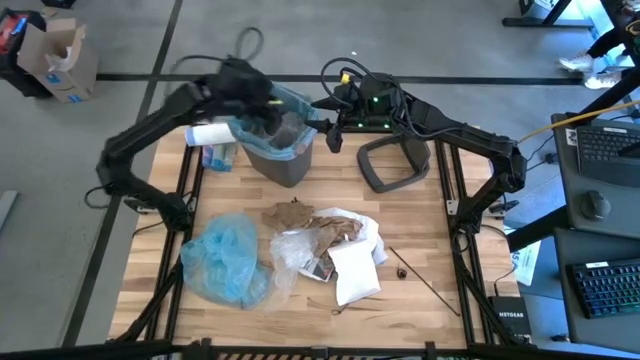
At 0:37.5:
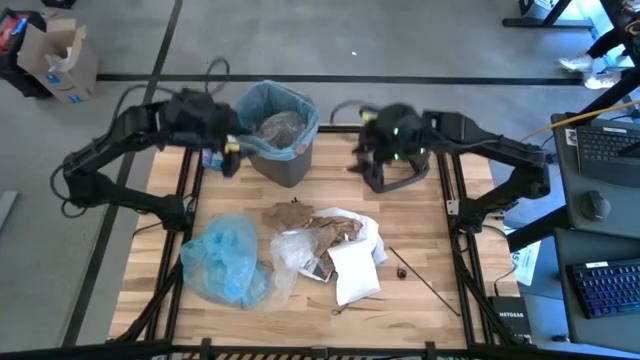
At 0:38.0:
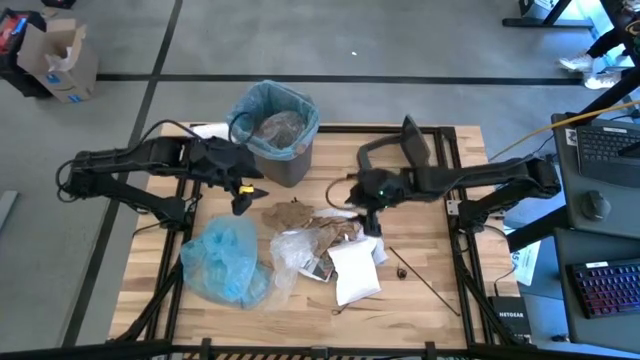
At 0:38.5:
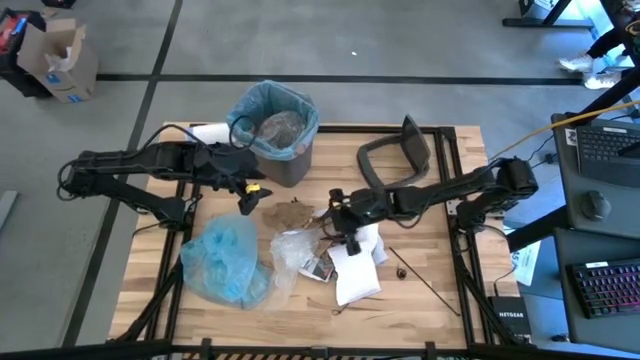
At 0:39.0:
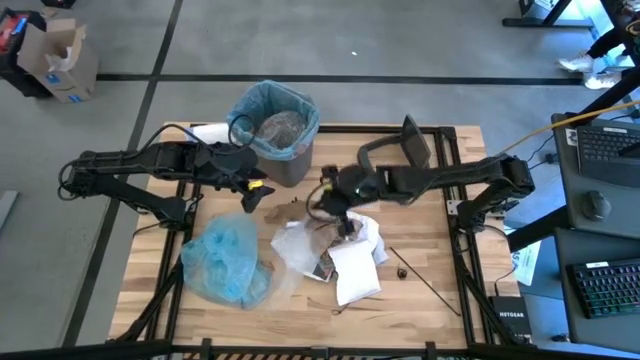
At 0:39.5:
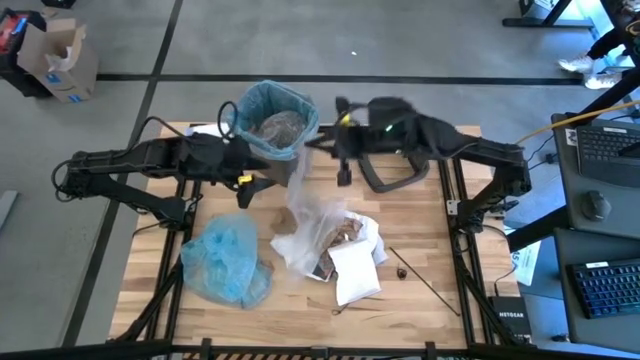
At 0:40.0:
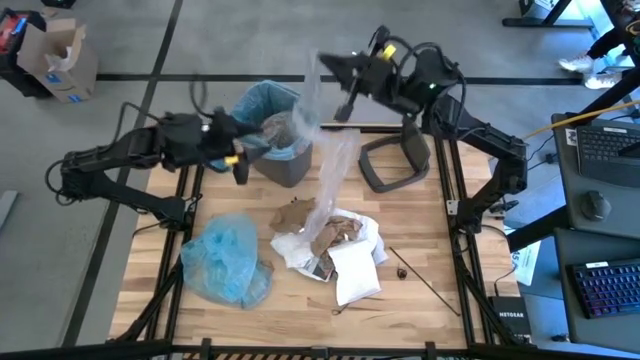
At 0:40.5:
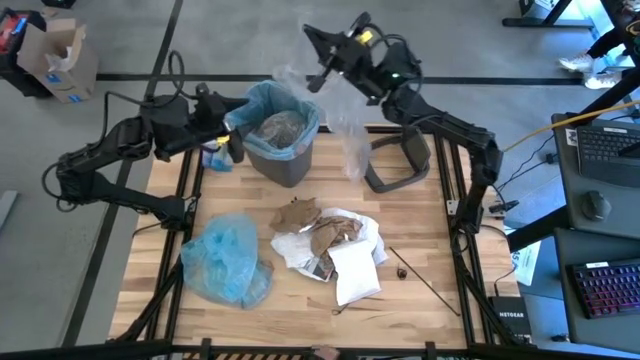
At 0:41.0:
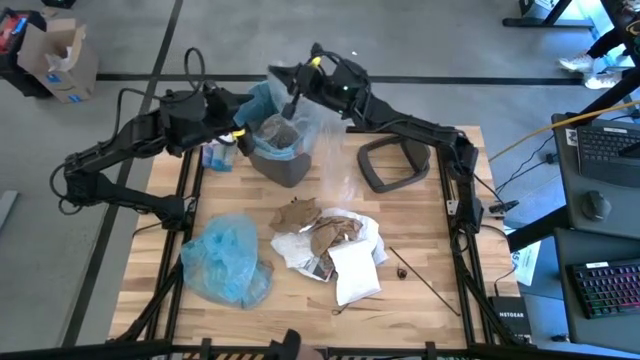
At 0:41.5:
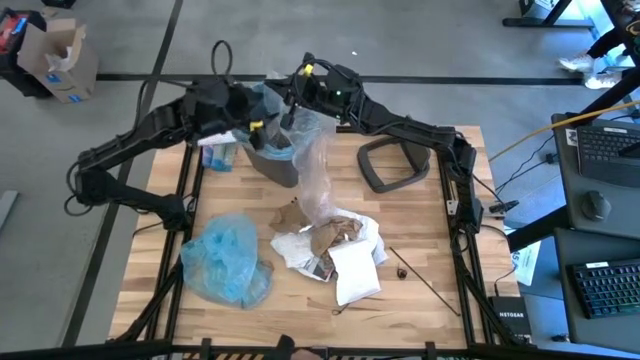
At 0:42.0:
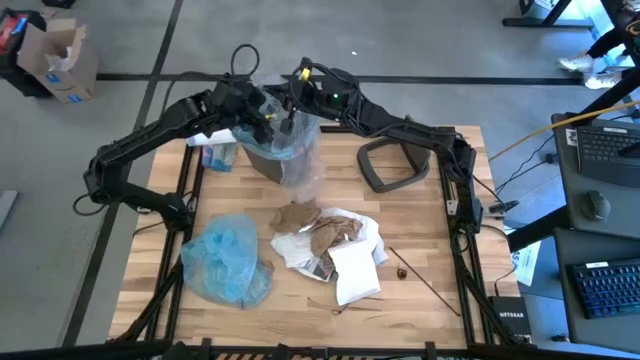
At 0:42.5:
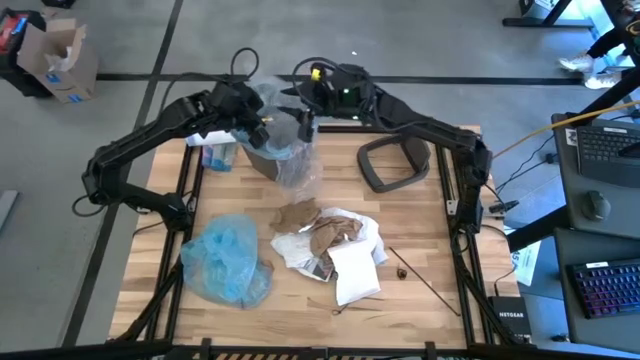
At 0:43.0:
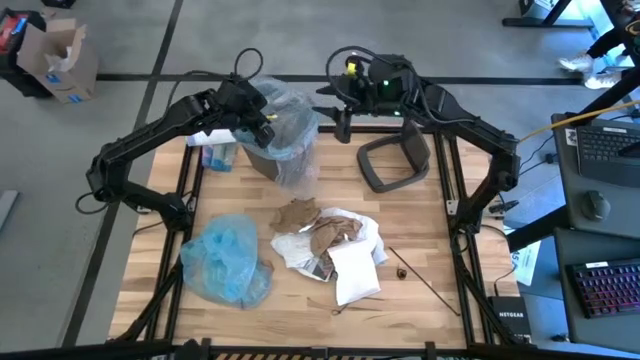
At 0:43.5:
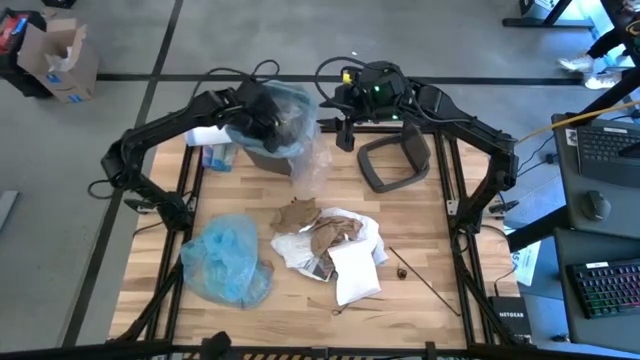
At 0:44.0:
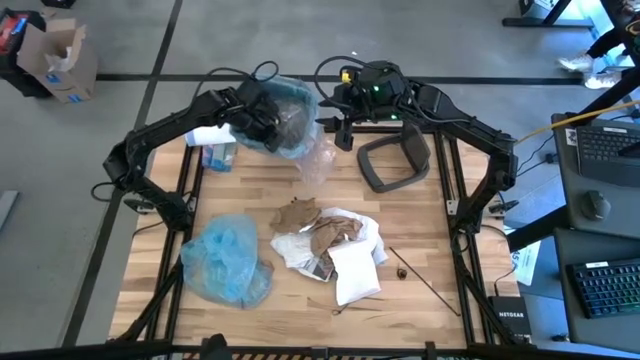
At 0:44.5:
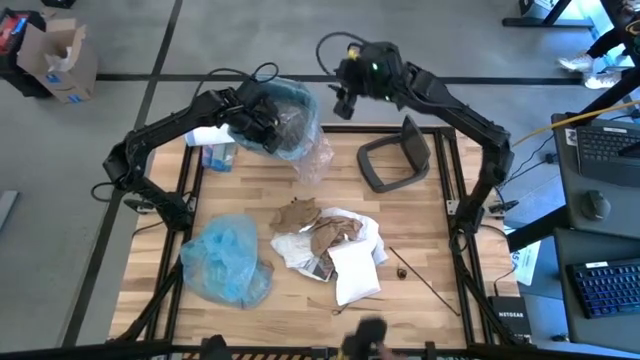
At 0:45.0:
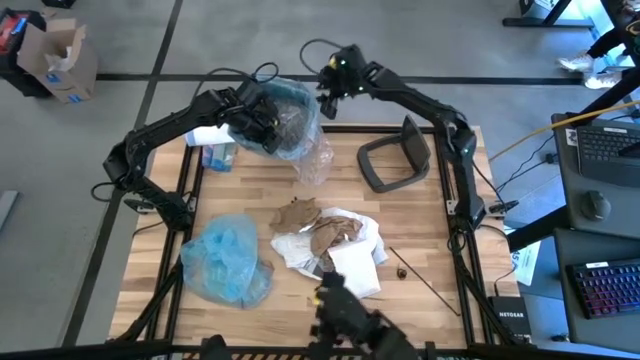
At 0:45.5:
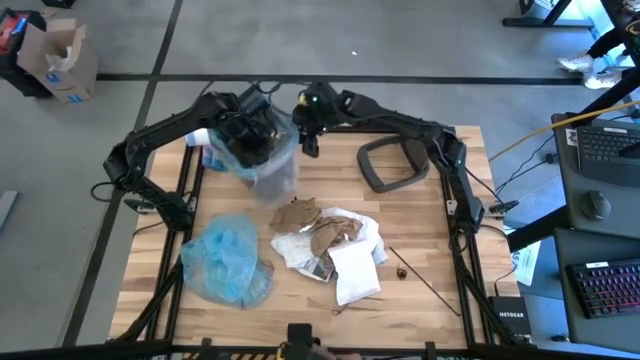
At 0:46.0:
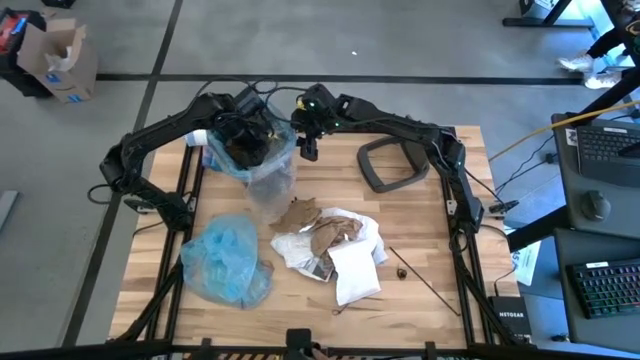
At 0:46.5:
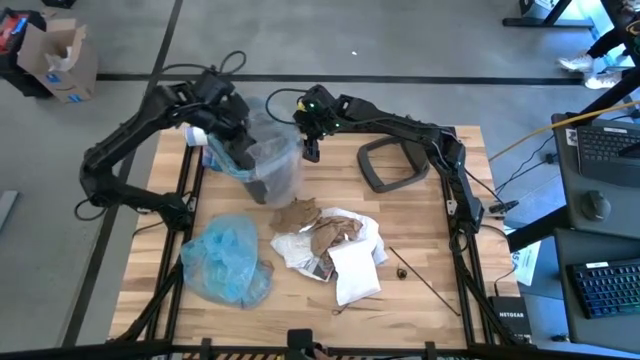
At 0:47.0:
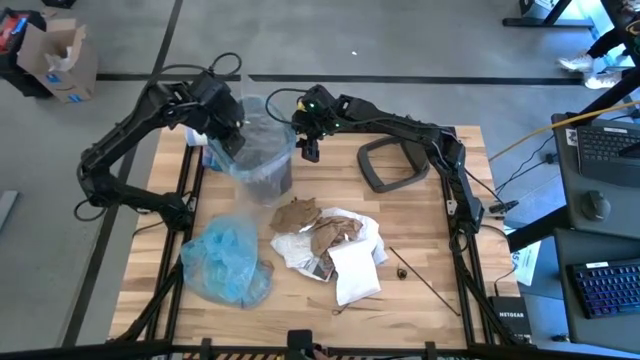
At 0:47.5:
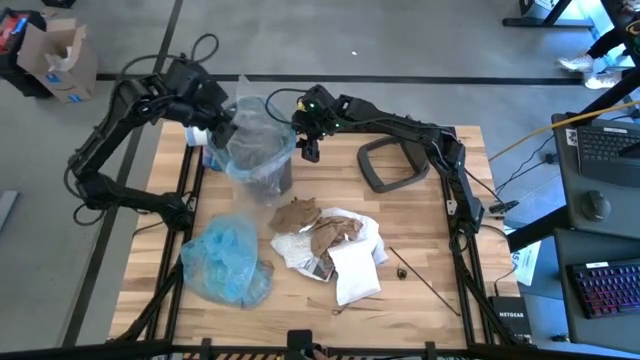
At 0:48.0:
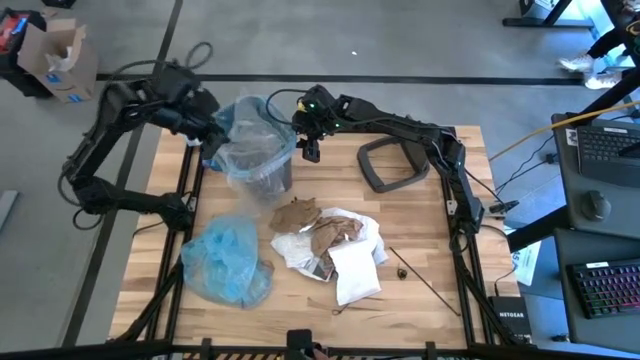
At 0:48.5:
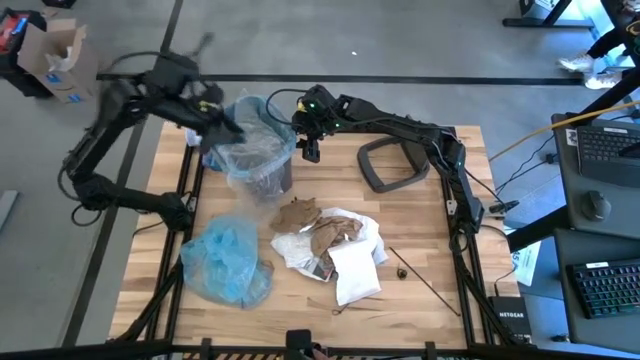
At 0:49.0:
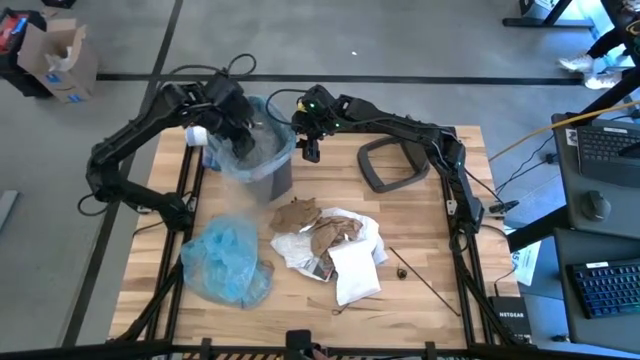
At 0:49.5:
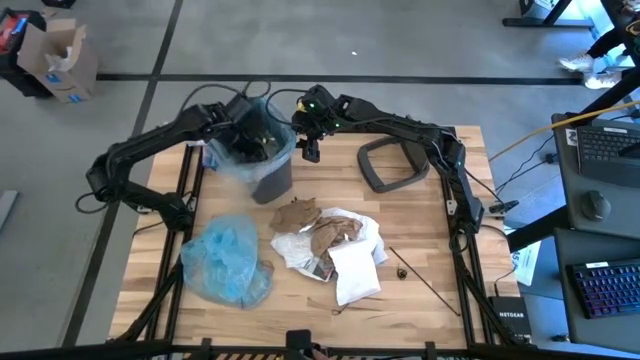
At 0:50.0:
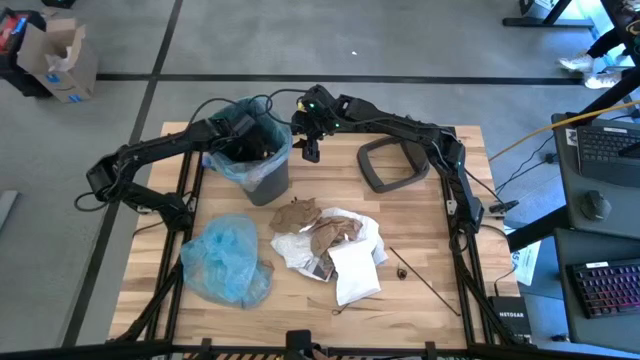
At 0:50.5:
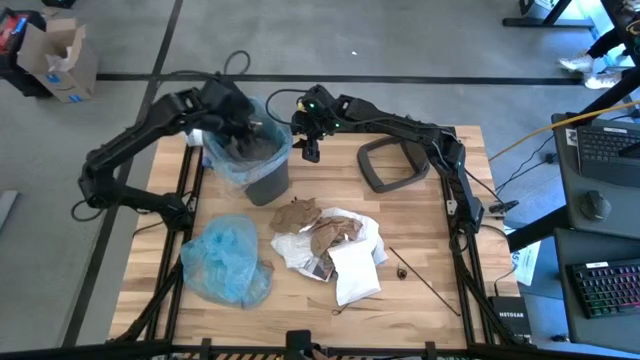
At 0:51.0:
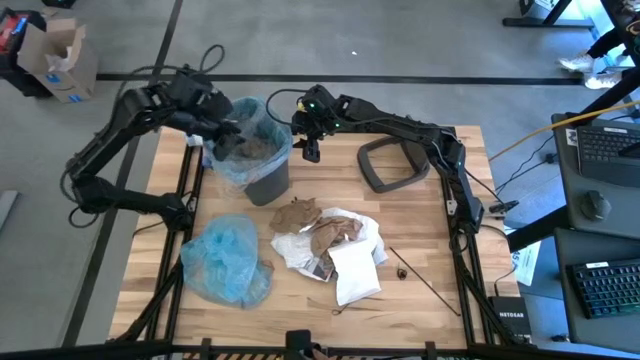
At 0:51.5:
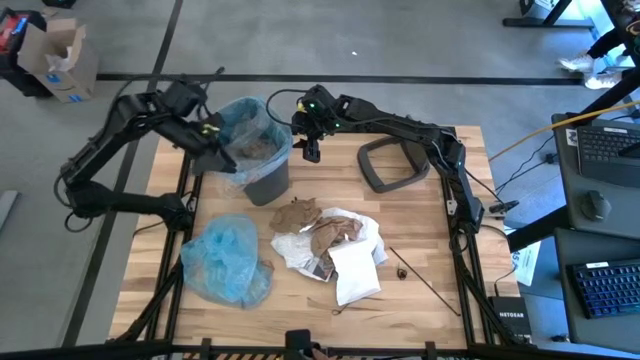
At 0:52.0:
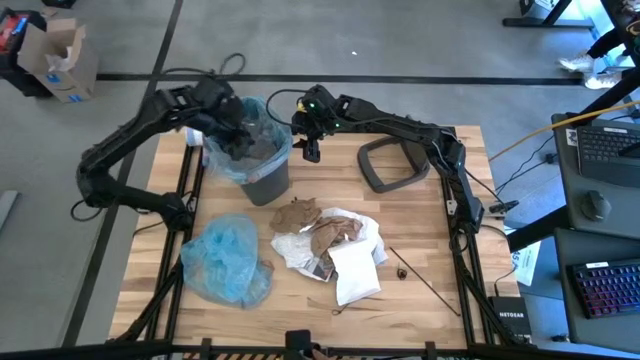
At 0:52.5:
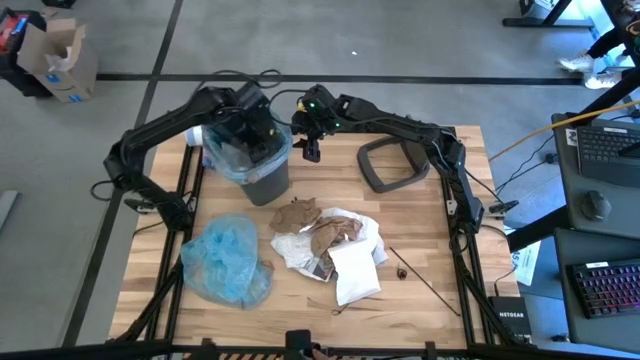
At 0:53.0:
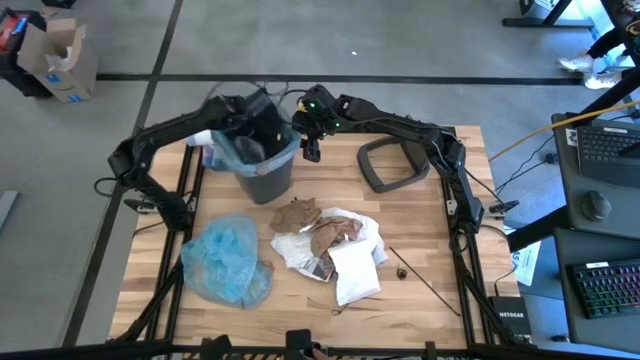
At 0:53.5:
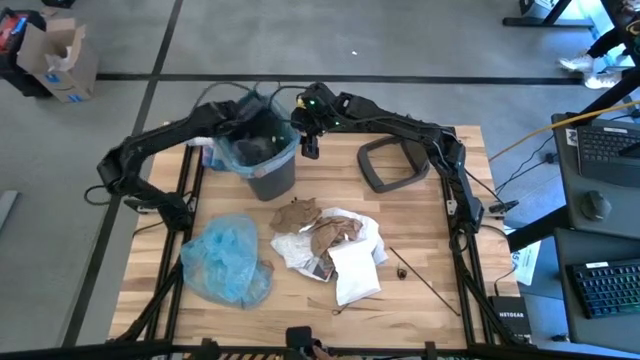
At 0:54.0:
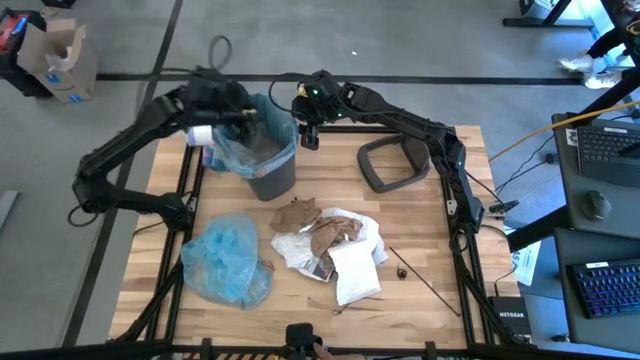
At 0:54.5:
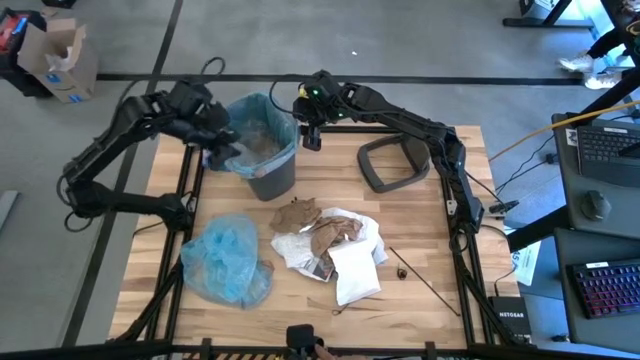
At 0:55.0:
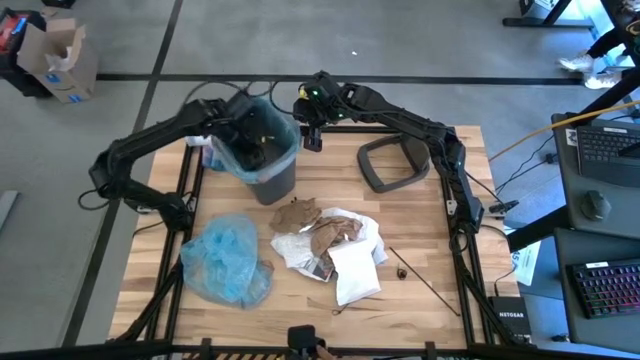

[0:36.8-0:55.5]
Task: Pick and place trash into bin
Put the transparent cellophane into the trash bin

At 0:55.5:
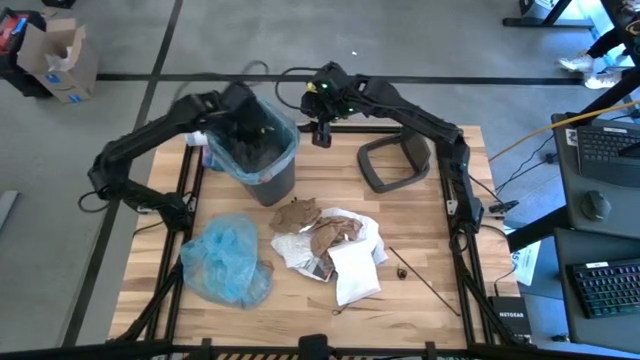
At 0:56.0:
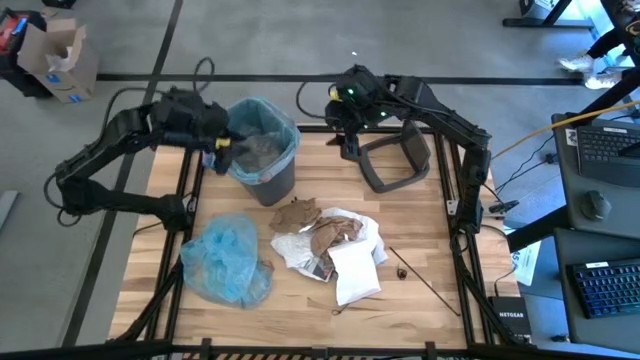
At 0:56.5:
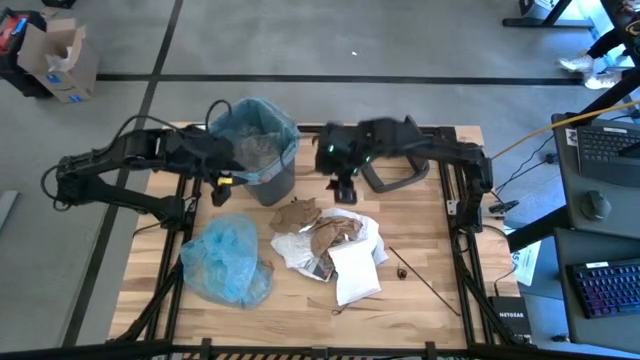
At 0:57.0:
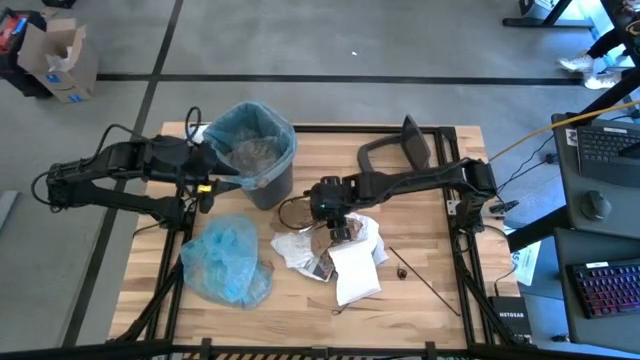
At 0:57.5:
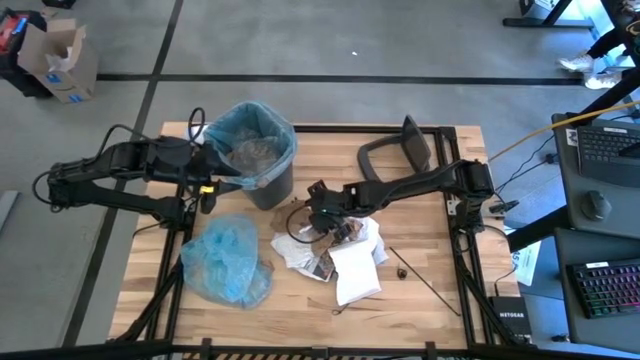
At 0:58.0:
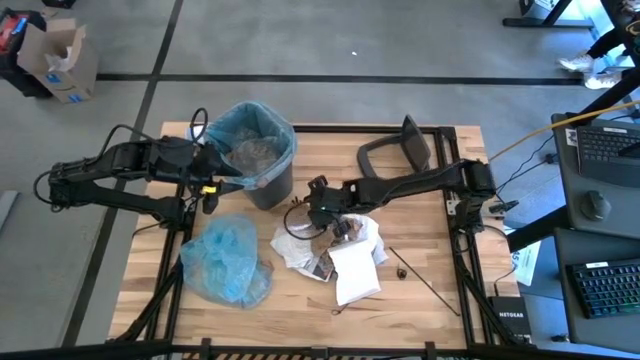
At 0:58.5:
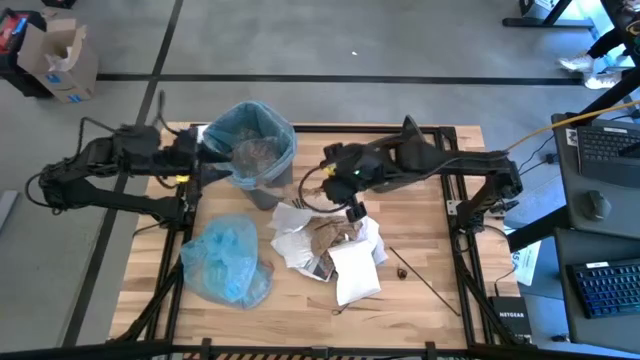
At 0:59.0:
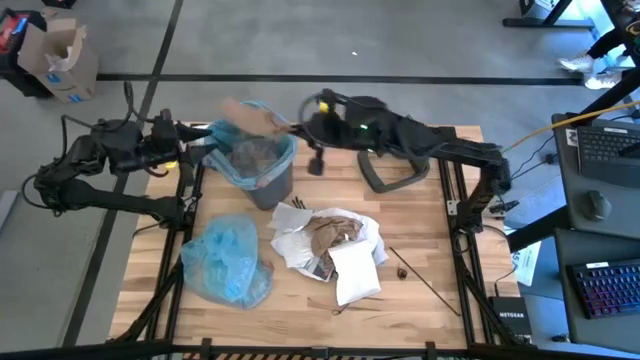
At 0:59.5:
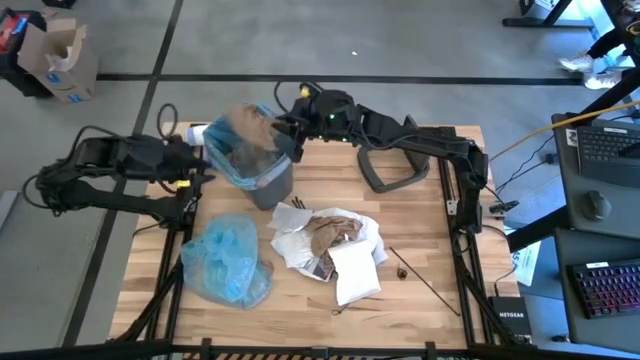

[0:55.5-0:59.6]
Put the brown napkin into the trash bin
